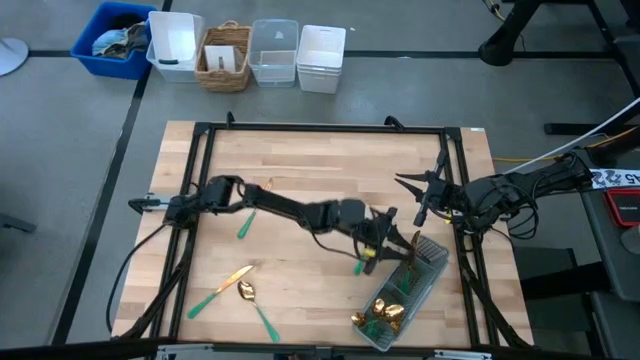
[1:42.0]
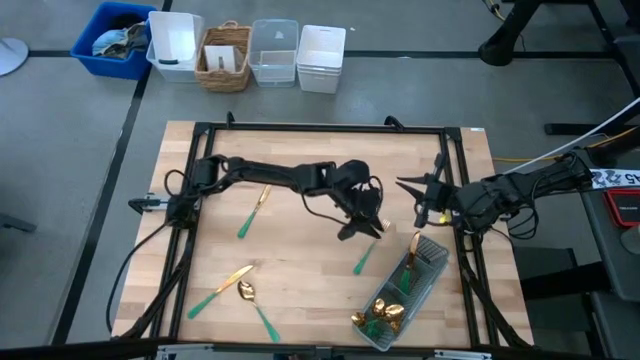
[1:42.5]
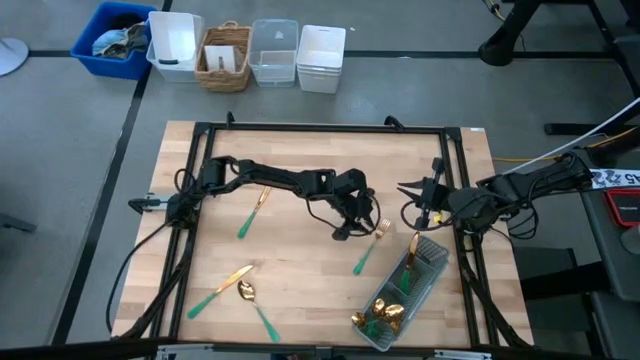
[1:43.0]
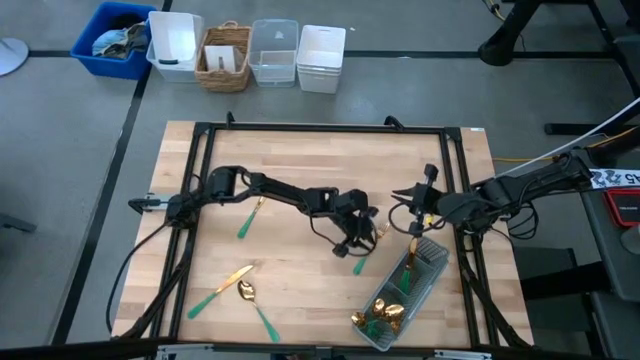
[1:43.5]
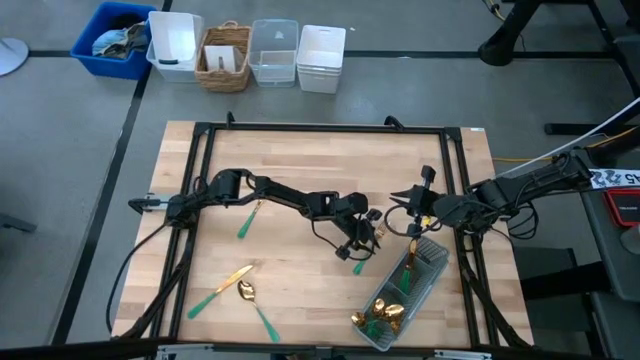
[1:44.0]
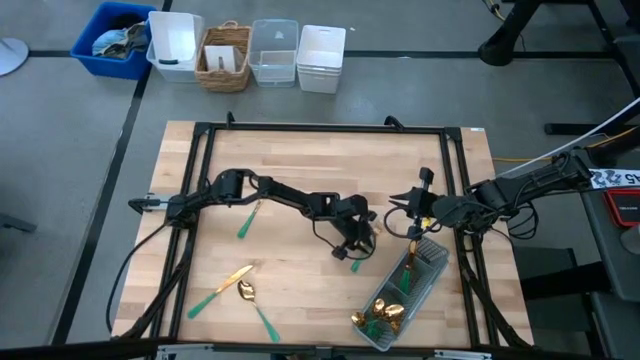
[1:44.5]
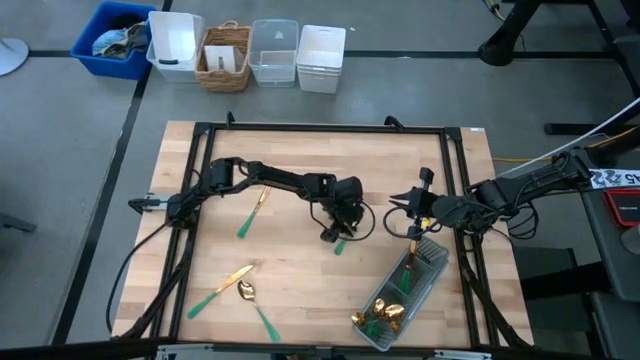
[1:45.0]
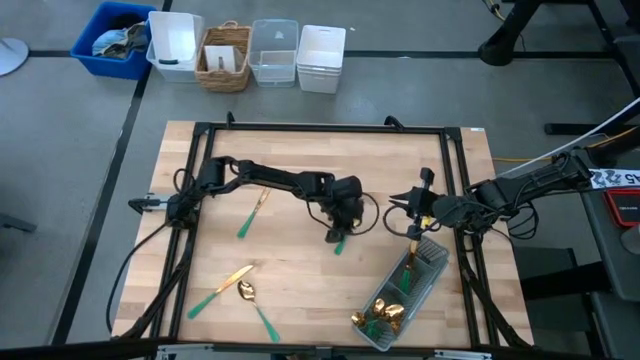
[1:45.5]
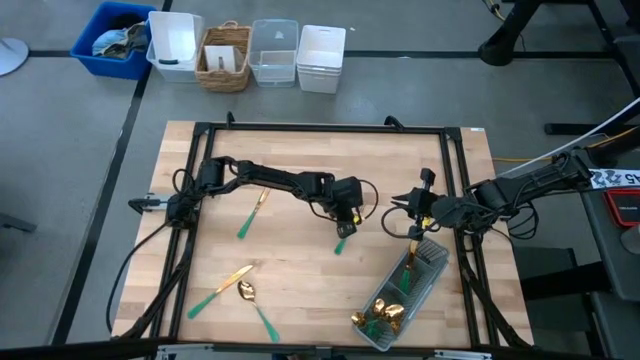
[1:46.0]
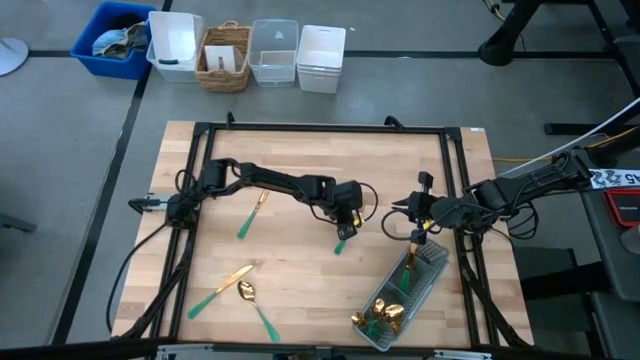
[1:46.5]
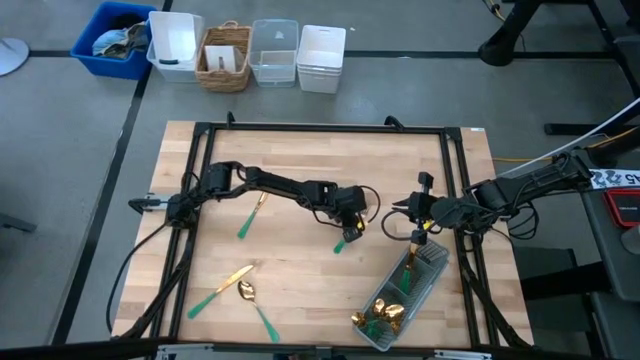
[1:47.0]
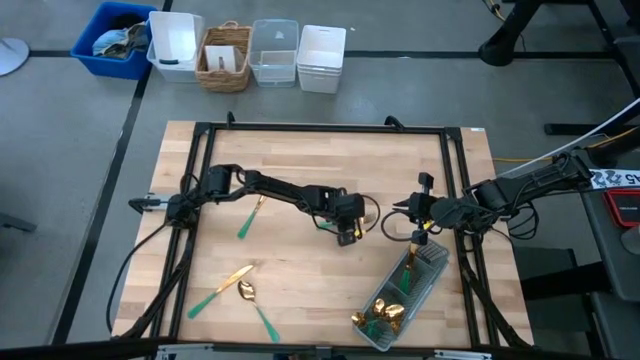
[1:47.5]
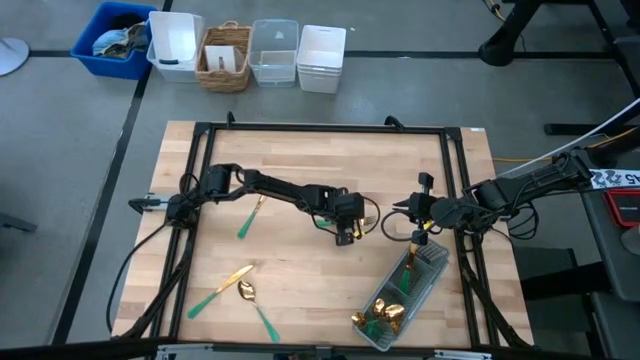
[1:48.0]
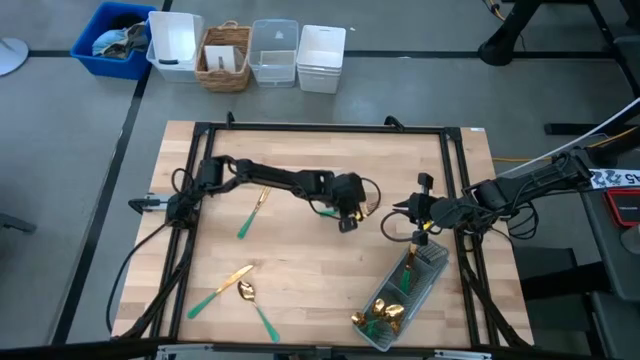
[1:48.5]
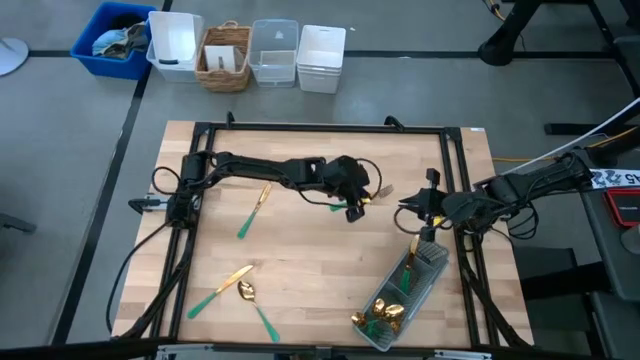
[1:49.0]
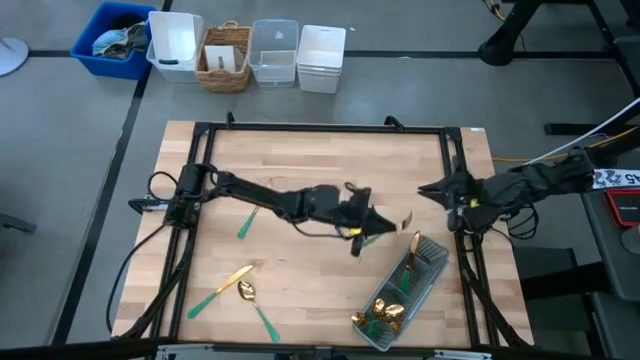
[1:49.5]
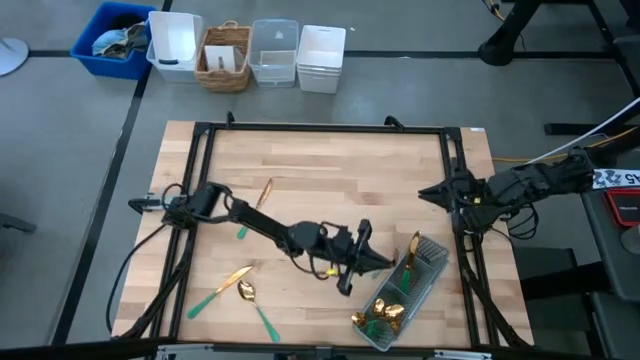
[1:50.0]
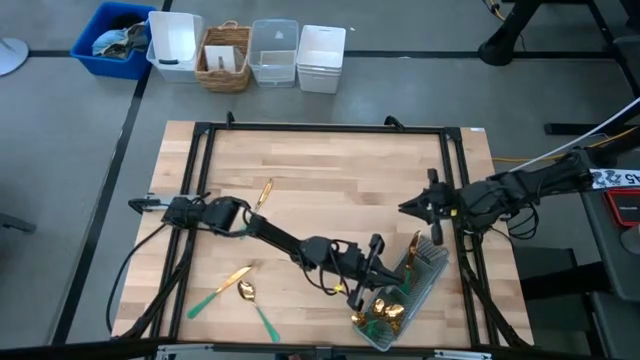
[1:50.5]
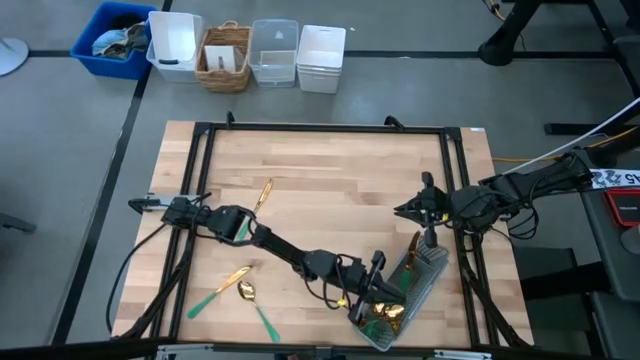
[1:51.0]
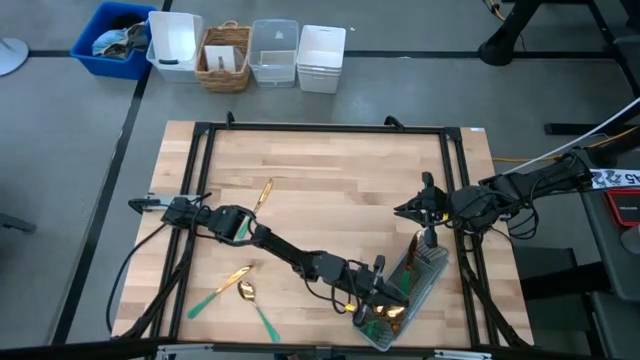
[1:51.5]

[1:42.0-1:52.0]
Task: Sort silverware
Put the fork into the utensil organizer

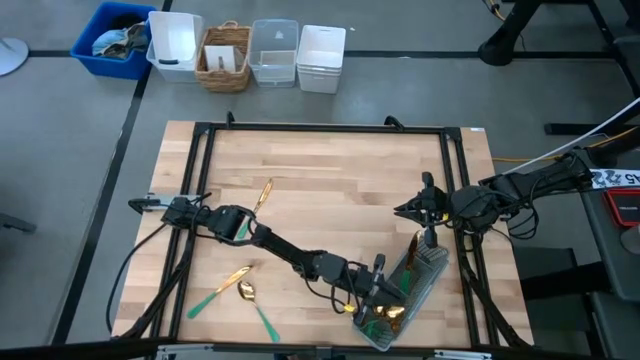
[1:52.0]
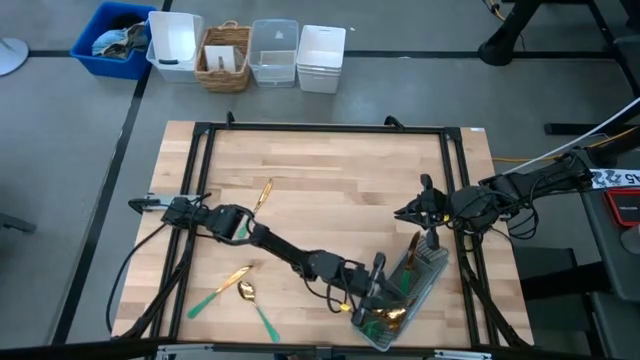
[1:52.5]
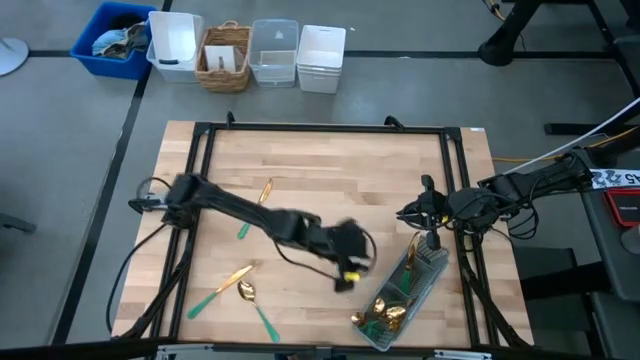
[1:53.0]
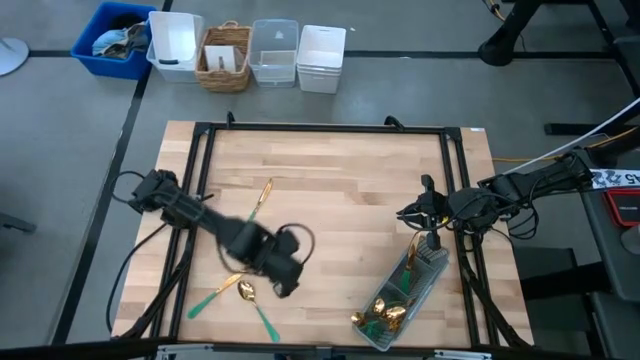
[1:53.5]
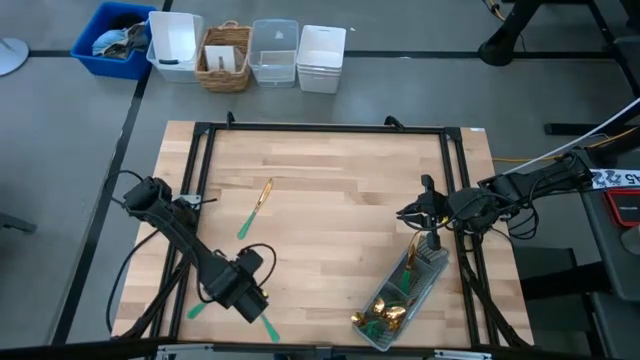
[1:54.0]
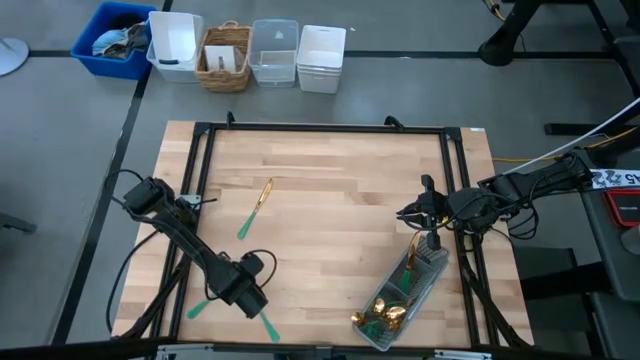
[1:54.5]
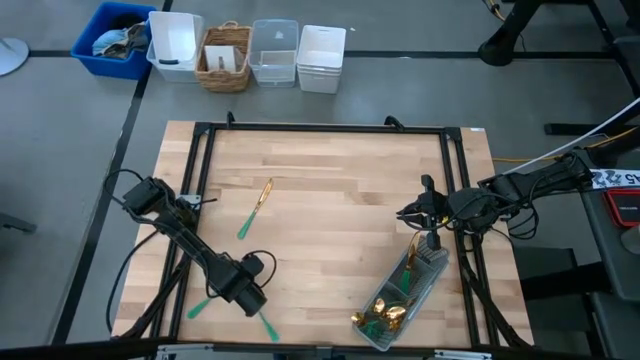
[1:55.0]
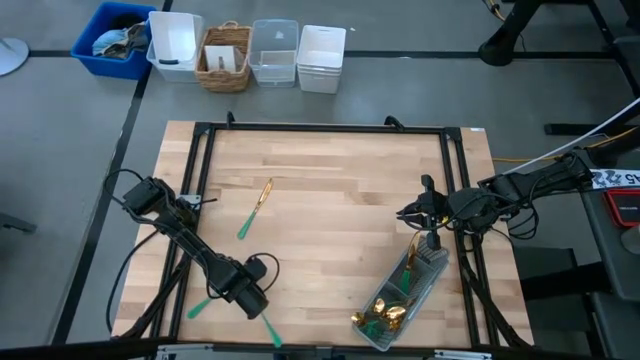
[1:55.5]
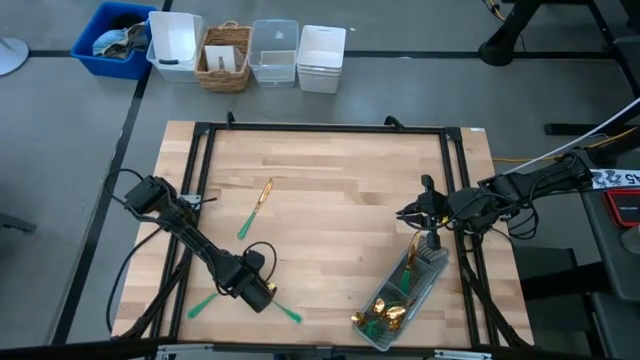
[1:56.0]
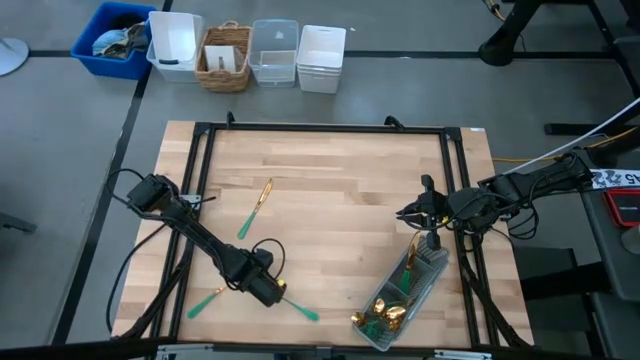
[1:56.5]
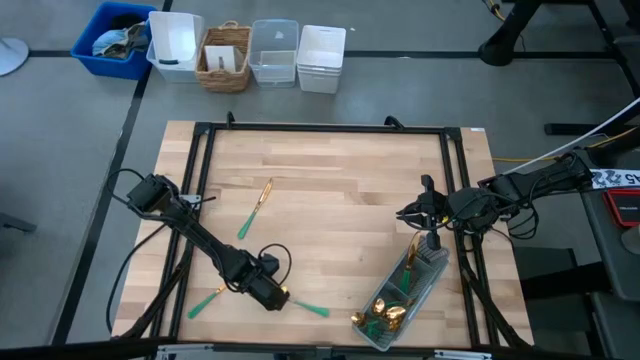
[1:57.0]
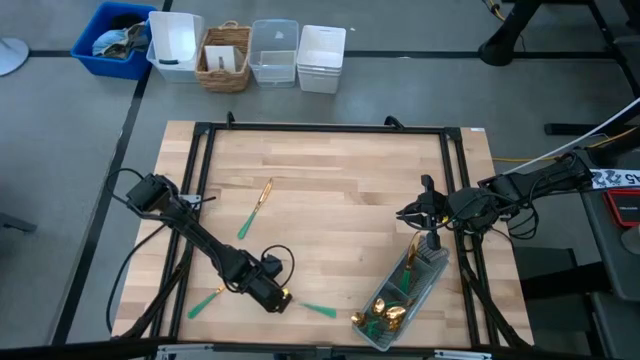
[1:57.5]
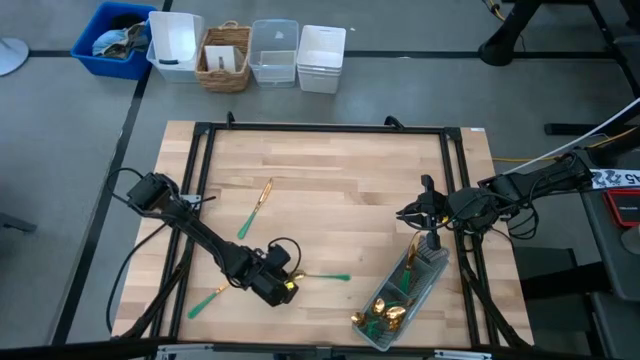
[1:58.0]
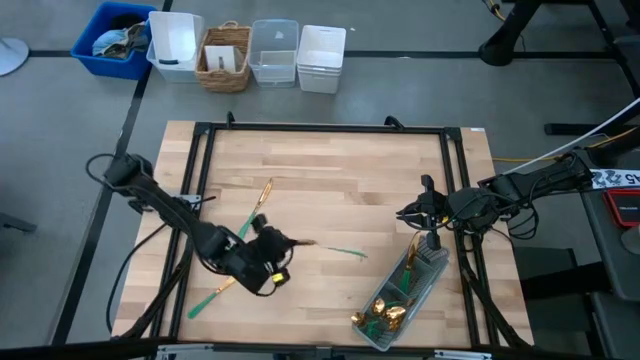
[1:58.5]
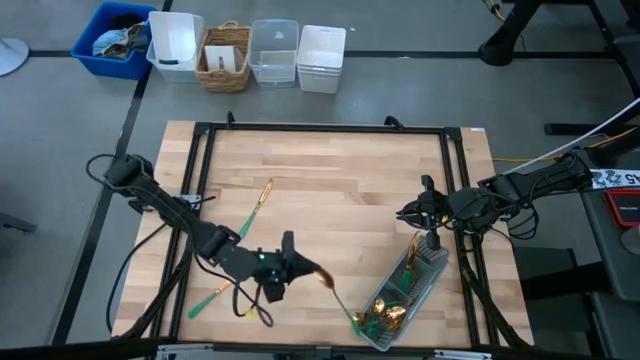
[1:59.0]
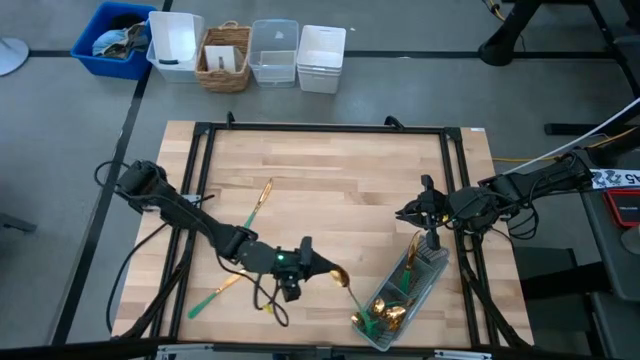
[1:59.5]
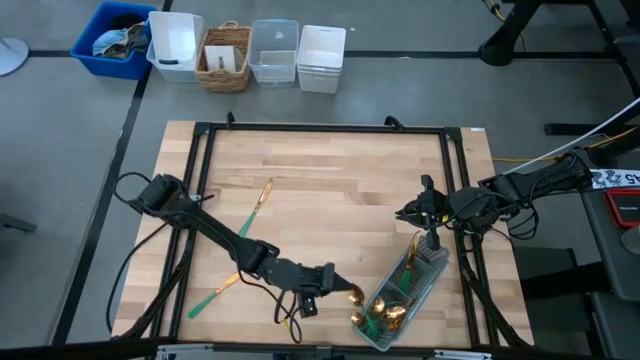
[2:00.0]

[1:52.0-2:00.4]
Put the spoon into the utensil organizer

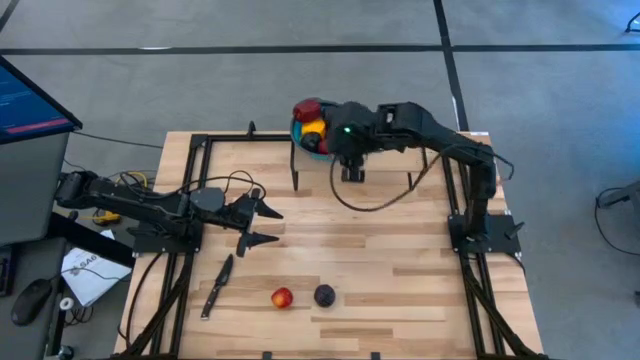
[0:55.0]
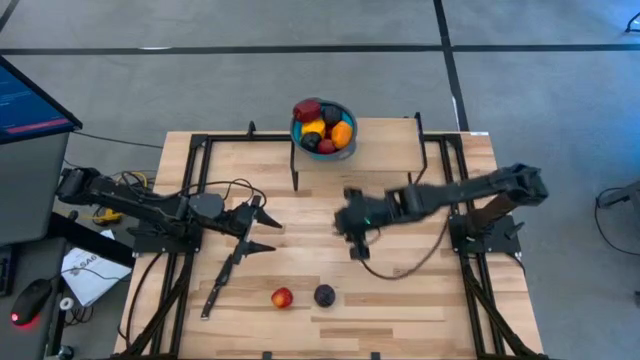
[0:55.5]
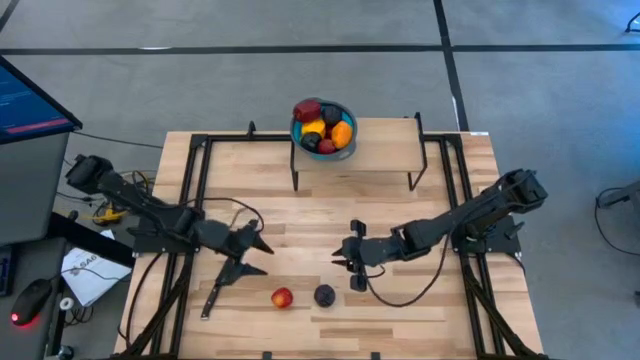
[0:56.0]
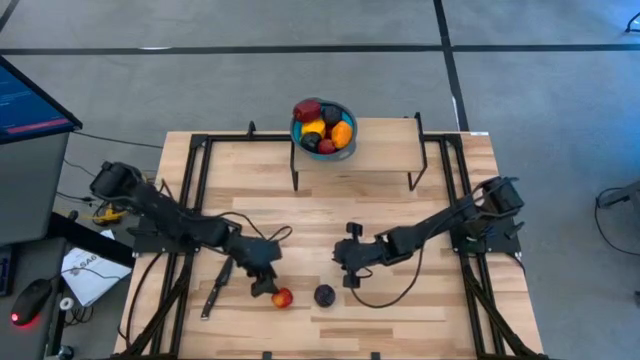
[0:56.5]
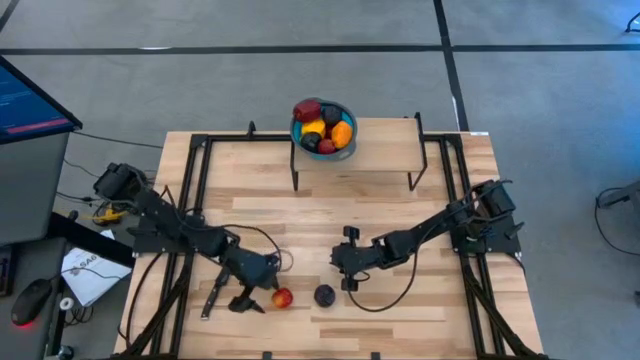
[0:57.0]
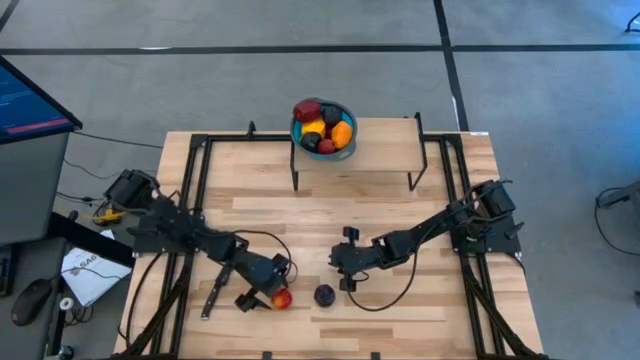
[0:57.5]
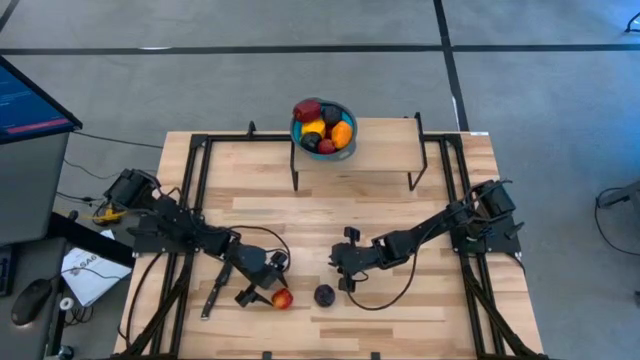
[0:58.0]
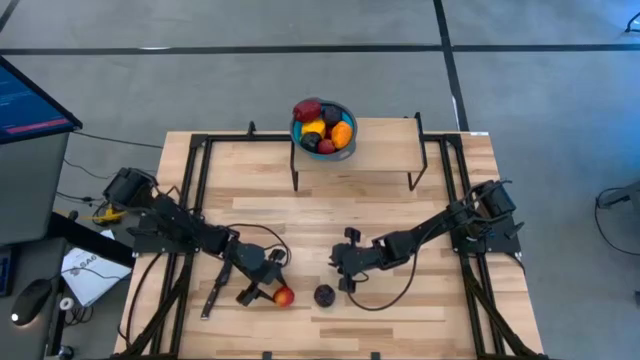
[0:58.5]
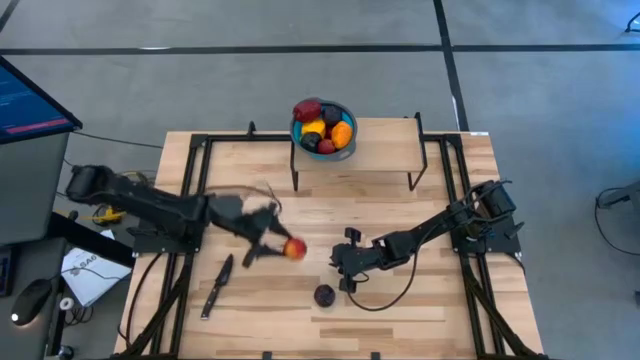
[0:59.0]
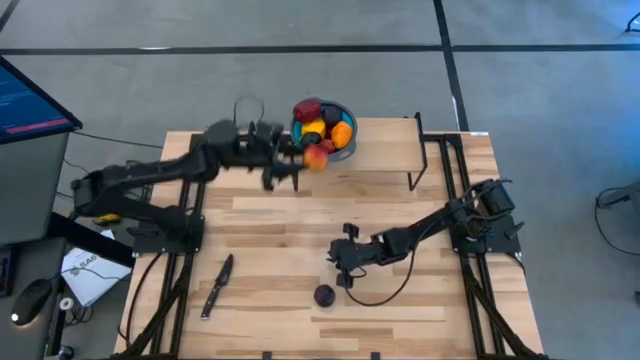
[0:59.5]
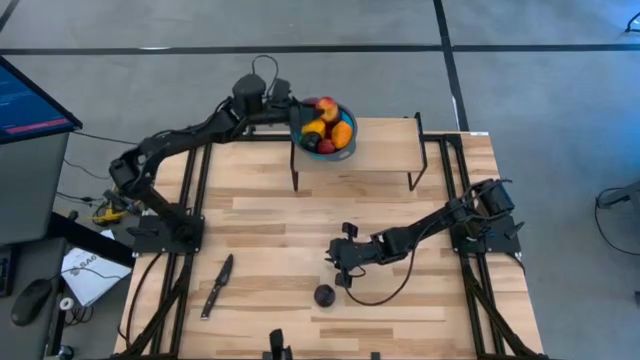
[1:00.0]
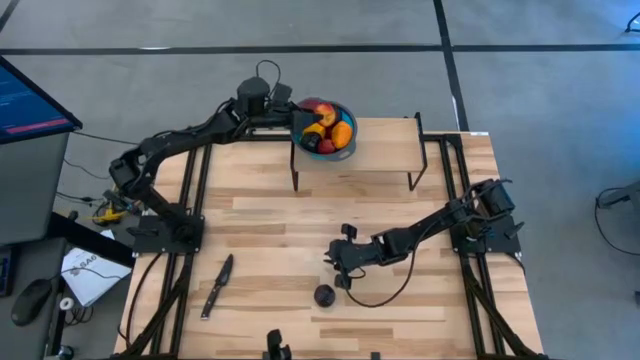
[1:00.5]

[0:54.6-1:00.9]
Task: Pick & Place Fruit
Put the red apple into the blue strainer bowl on the shelf
